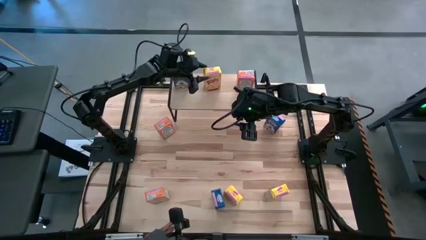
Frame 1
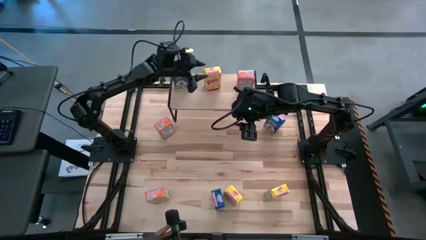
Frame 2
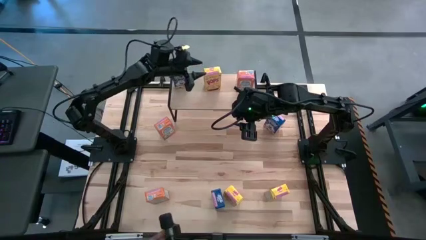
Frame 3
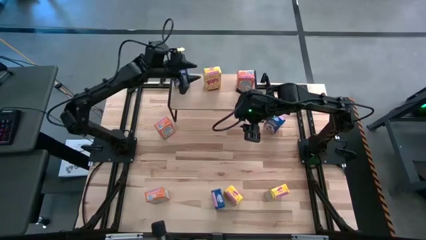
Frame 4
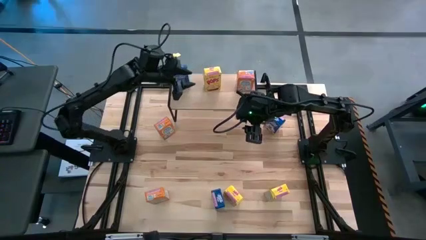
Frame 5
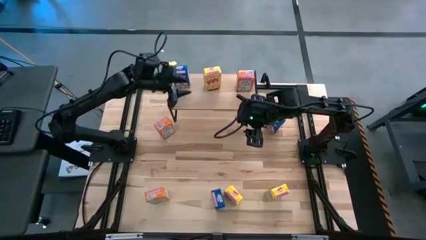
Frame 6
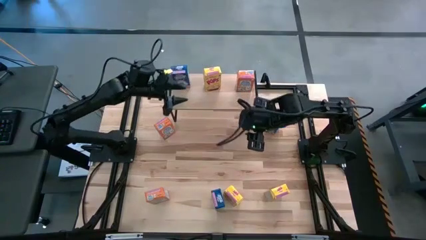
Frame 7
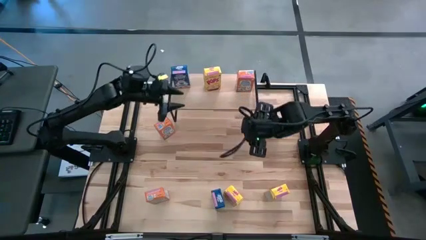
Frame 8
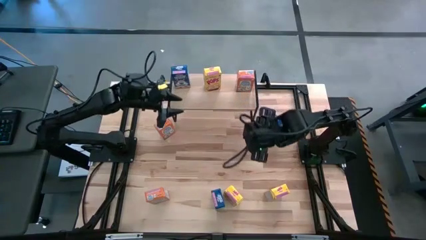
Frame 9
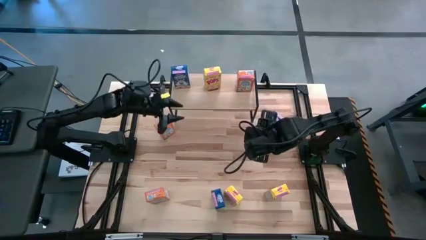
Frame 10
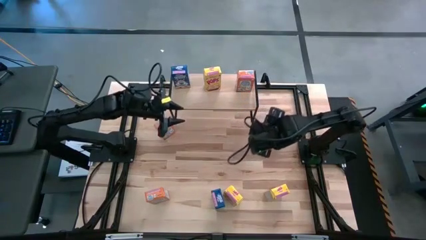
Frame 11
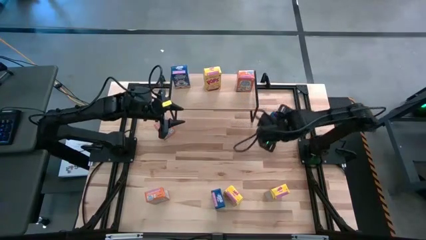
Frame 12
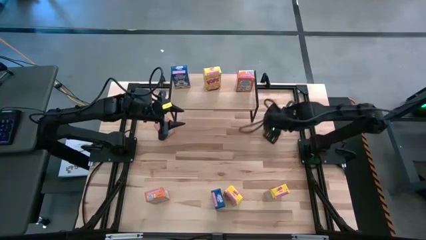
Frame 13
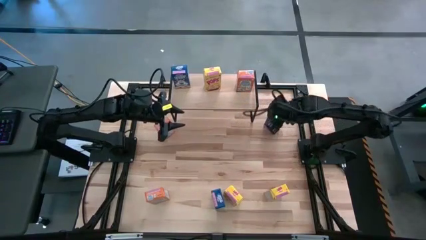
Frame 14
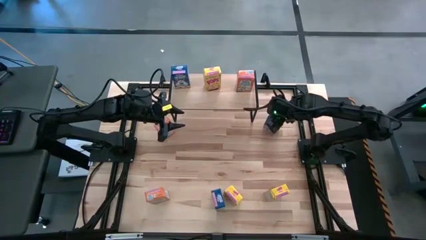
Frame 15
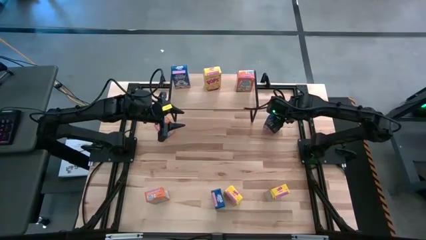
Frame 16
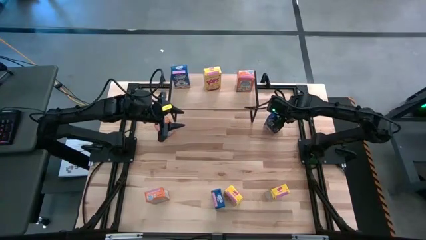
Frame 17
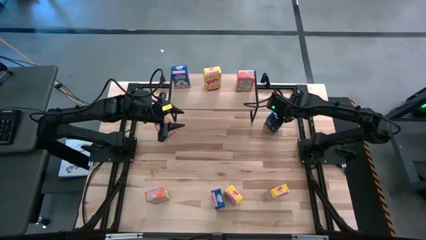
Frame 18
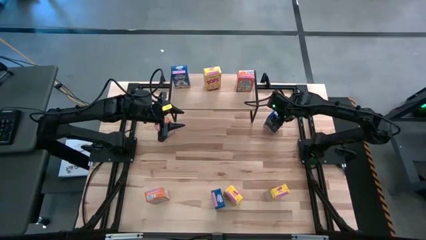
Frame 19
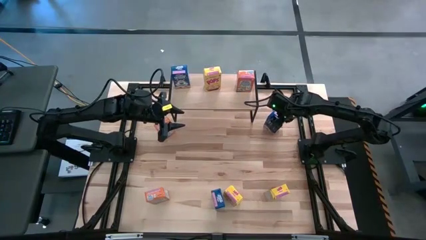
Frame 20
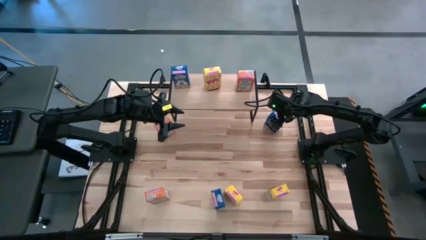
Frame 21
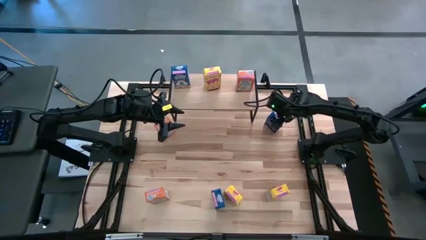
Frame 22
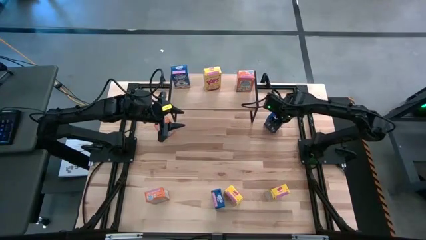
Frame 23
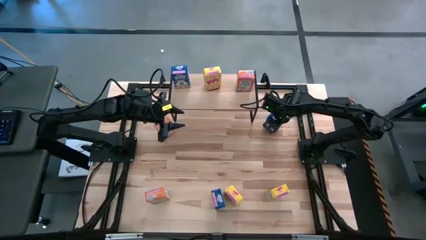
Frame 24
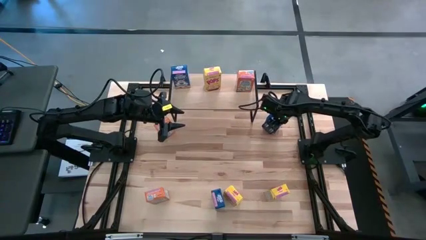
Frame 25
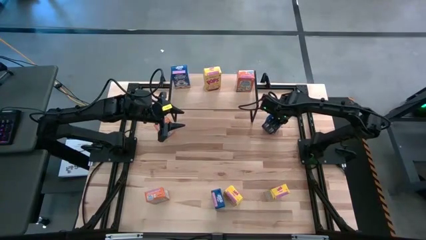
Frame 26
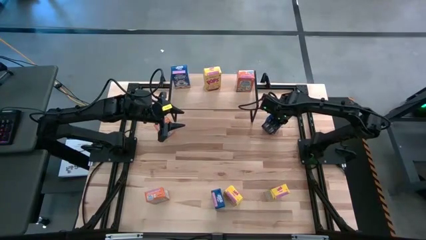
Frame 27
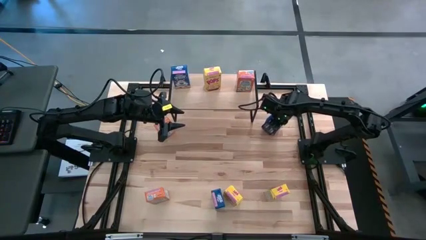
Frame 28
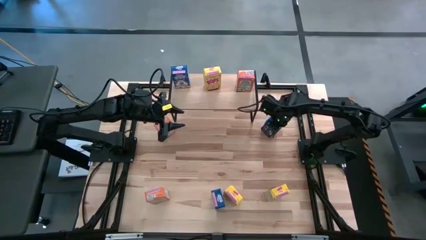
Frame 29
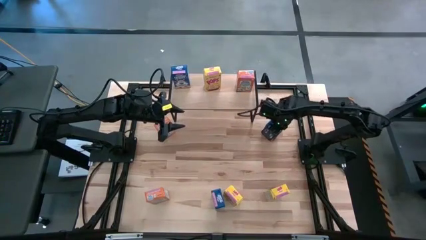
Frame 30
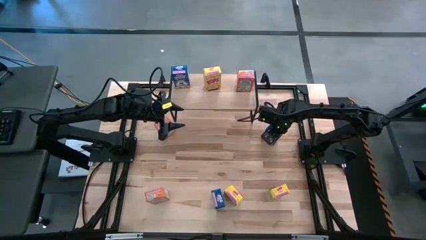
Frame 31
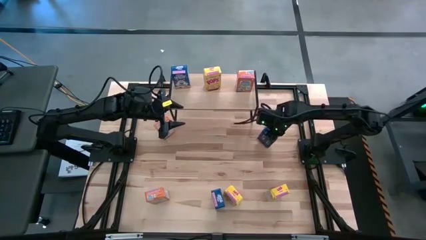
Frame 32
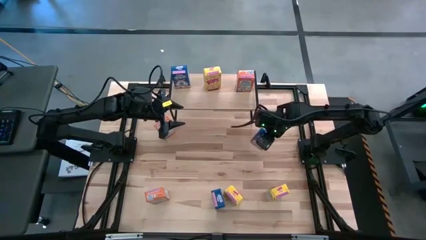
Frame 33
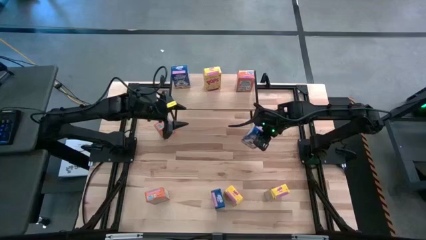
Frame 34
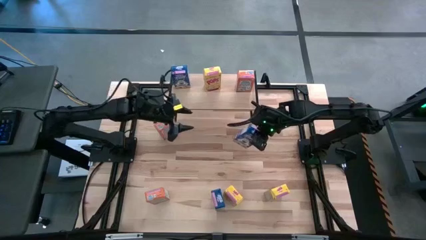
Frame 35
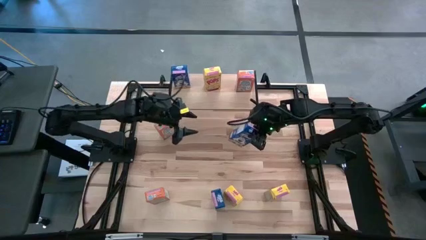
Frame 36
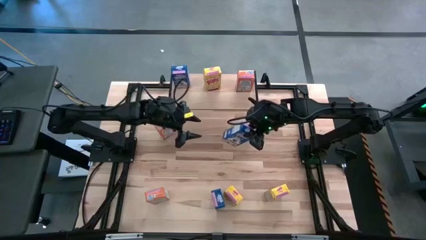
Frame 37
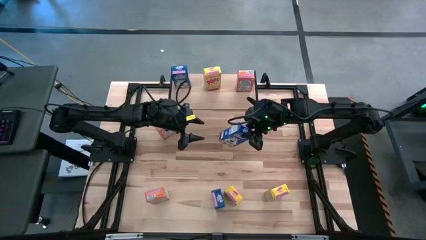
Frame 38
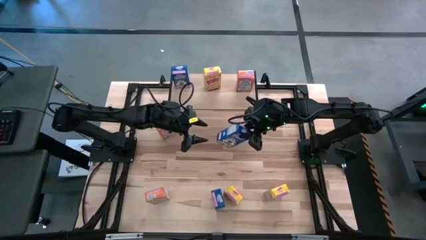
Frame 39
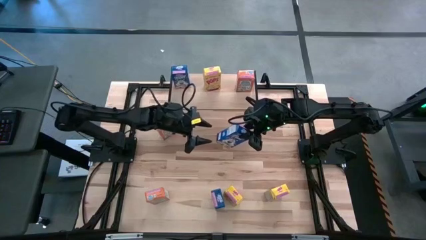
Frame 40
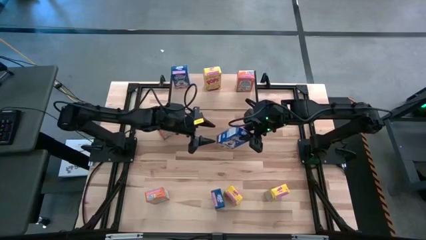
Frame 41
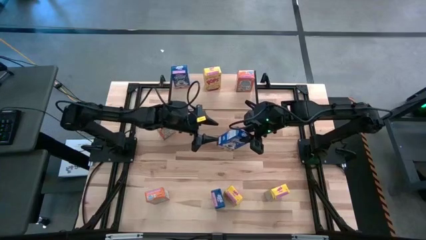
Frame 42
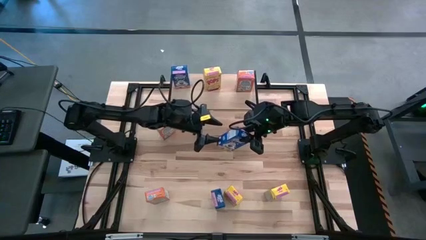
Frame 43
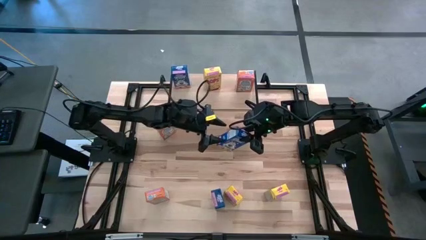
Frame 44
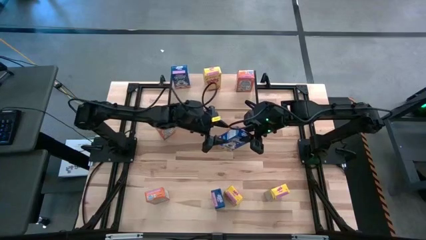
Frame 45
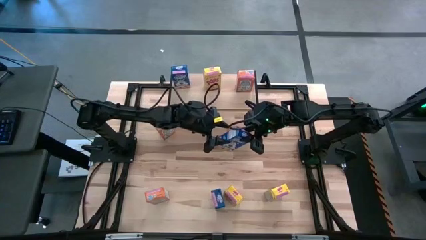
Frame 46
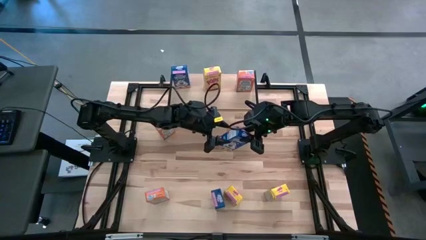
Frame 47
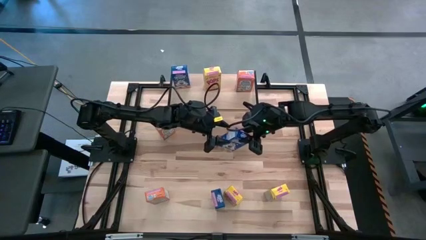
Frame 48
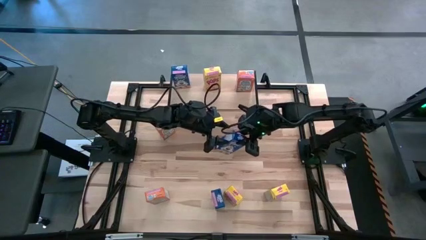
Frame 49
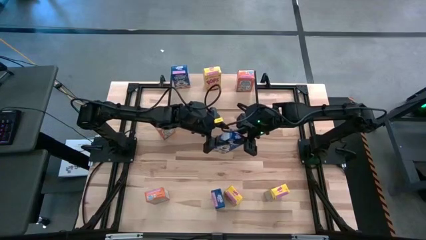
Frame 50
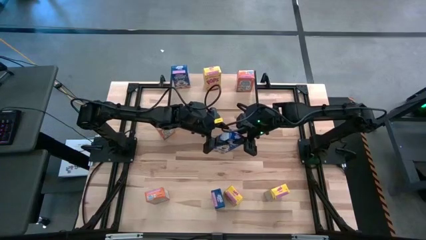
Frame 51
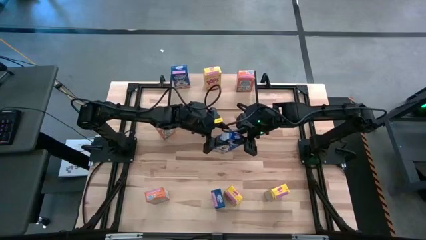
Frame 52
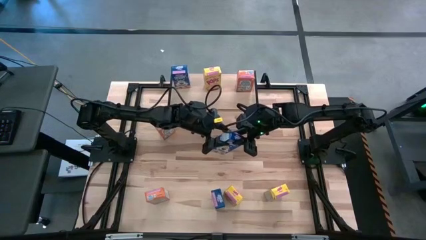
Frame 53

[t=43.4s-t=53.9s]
Task: Stack cereal on shelf
Put the top blue cereal box on the shelf
